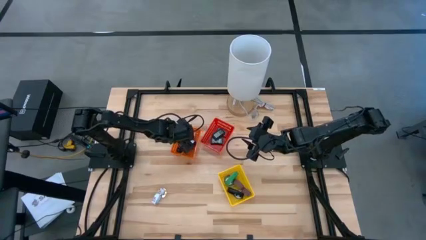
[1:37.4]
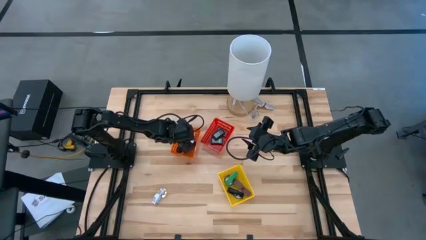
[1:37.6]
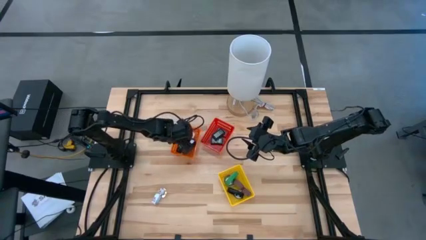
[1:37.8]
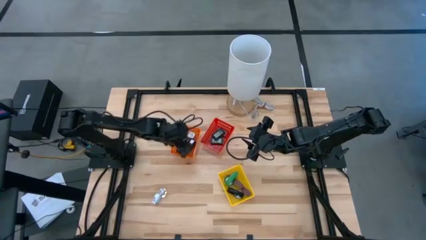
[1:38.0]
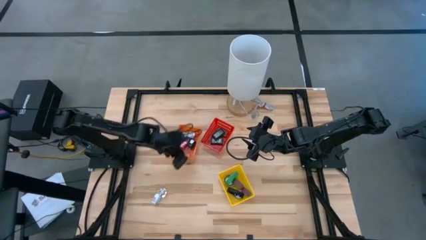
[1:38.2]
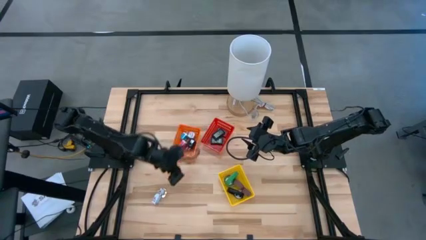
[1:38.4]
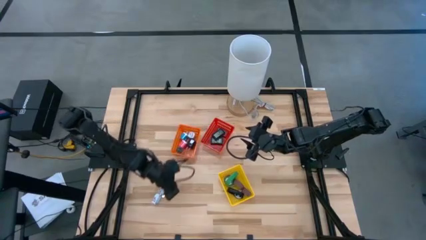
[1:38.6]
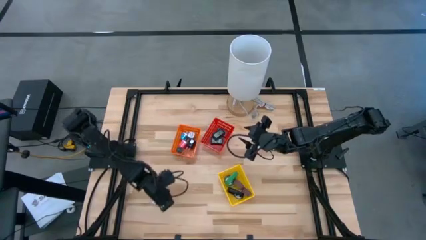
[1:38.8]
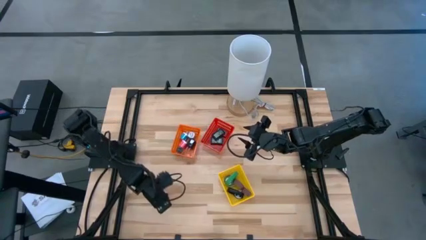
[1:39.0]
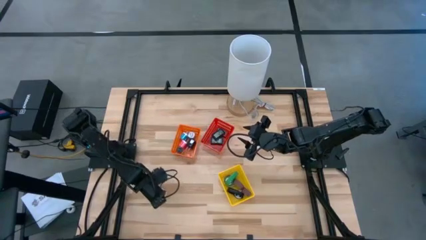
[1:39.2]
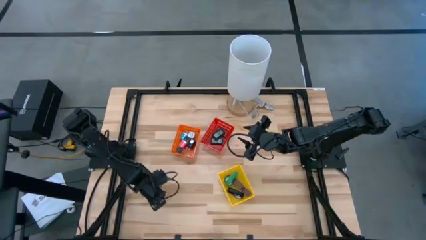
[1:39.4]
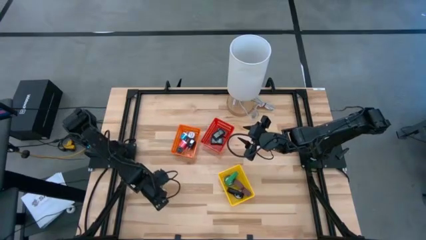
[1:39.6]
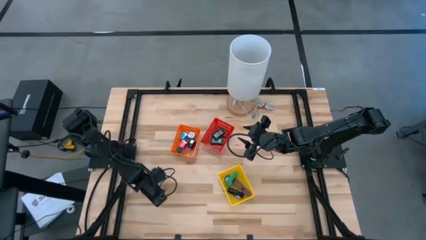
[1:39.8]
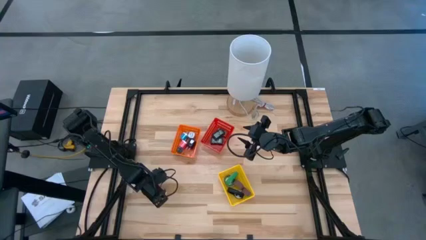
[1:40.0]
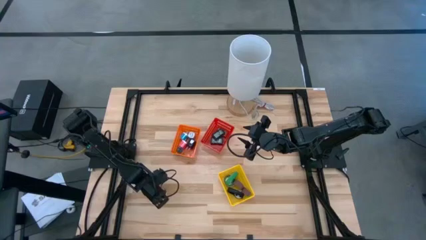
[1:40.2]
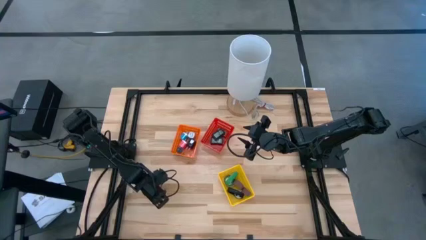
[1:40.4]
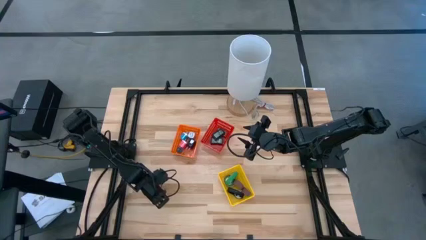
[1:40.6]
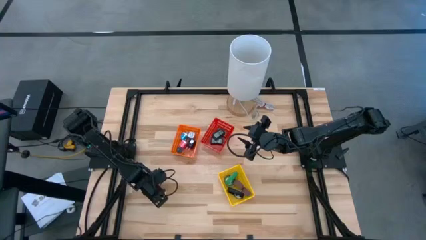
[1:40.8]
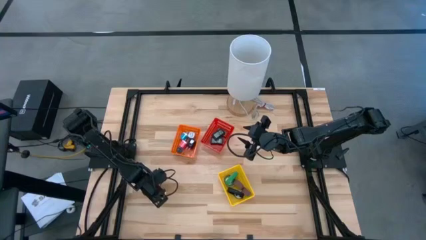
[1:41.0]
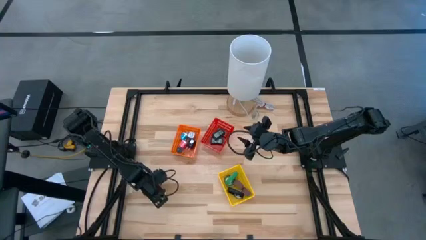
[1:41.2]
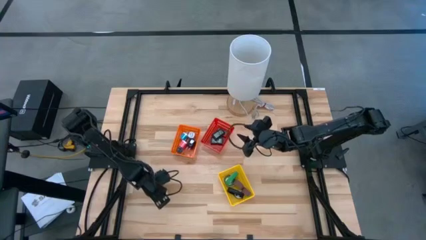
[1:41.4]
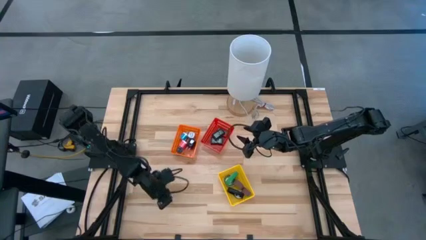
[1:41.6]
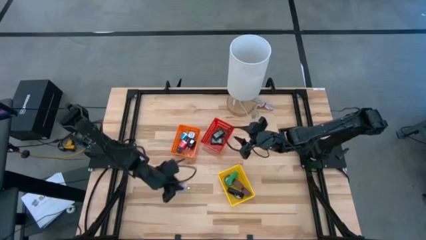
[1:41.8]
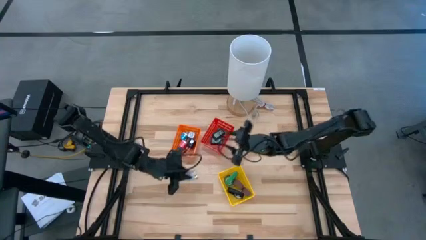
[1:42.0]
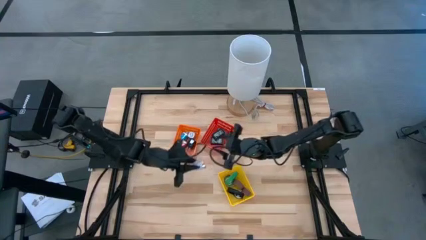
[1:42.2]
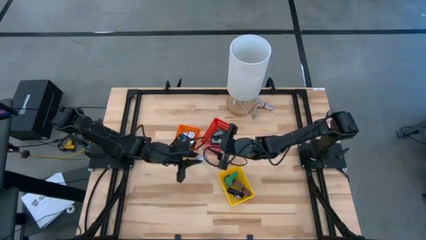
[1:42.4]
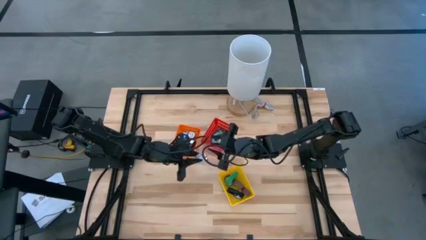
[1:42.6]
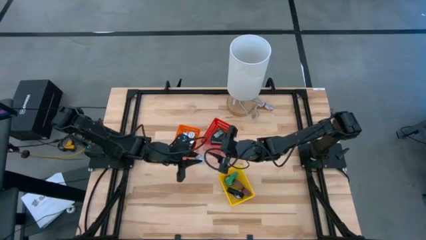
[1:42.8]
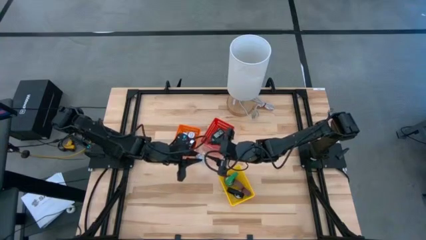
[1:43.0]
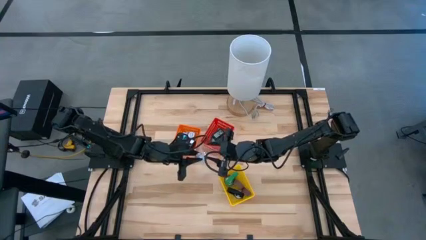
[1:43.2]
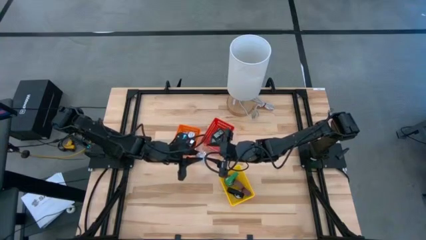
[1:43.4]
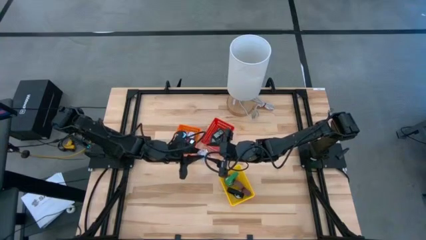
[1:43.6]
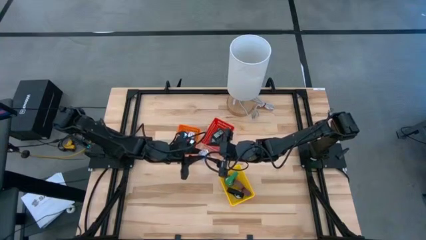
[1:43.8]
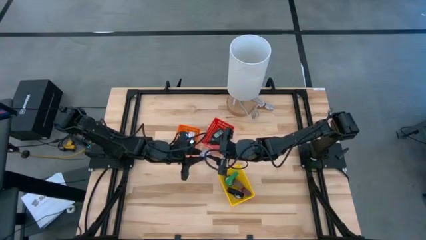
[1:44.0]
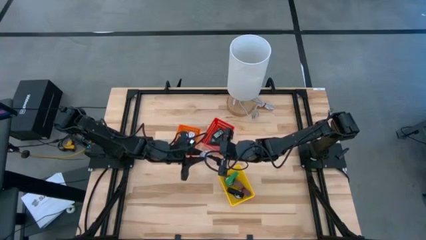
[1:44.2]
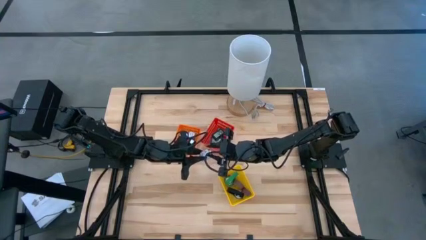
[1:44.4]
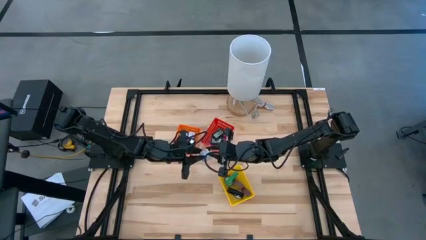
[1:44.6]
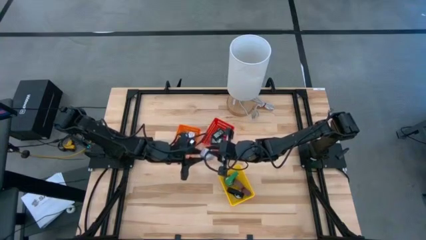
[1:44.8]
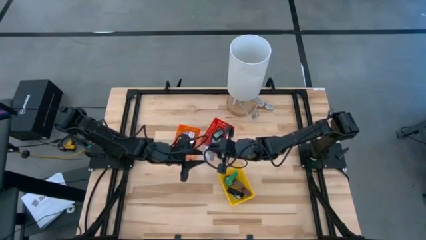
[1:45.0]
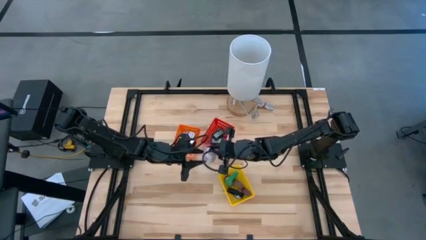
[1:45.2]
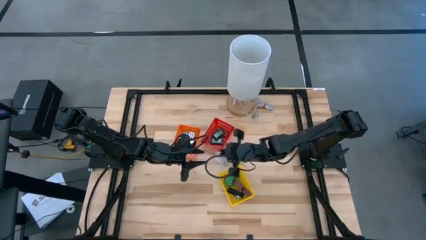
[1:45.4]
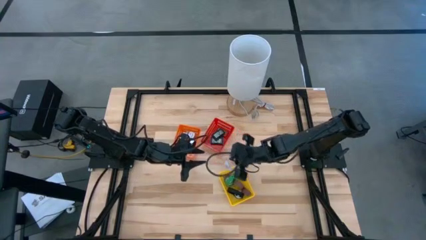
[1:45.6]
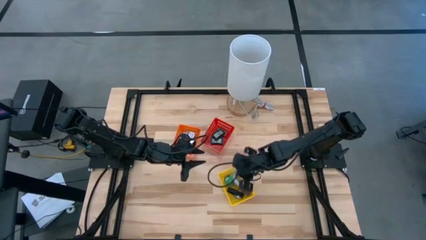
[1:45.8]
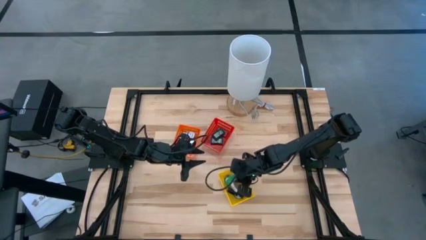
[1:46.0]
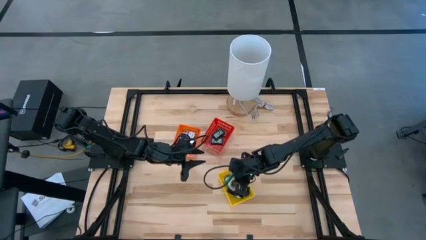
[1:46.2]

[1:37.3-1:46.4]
Task: Pick & Place Office items
Put the white wrist watch into the yellow bin

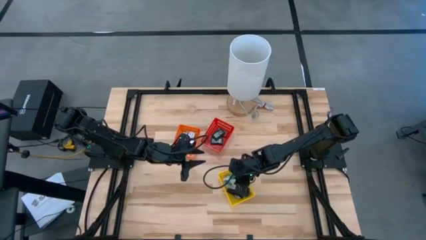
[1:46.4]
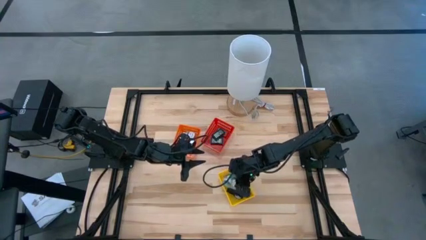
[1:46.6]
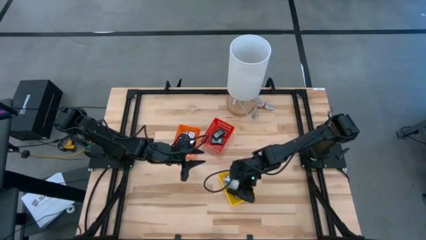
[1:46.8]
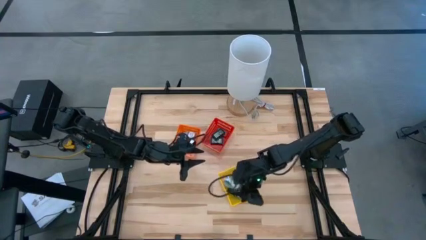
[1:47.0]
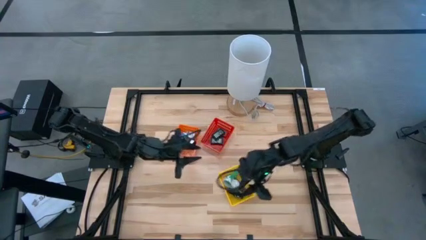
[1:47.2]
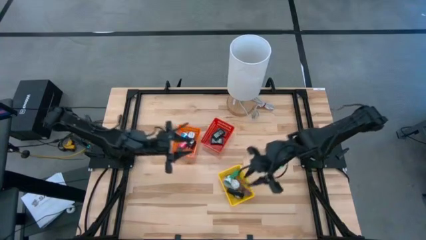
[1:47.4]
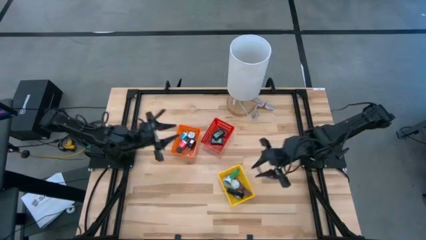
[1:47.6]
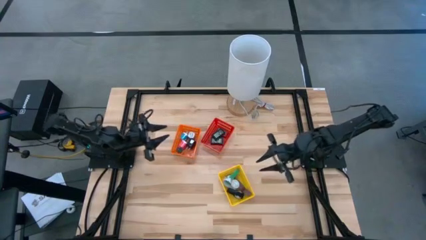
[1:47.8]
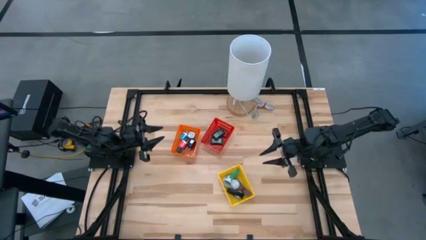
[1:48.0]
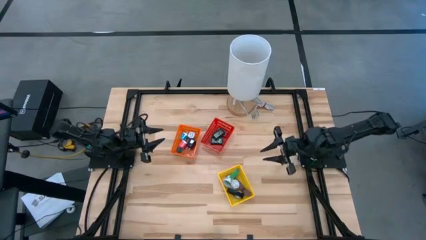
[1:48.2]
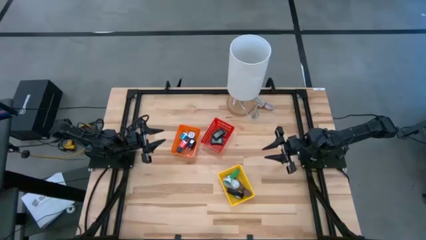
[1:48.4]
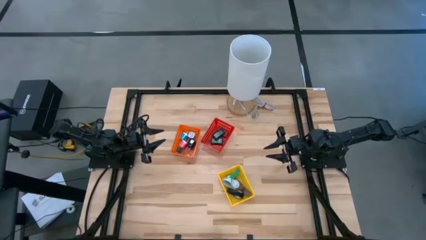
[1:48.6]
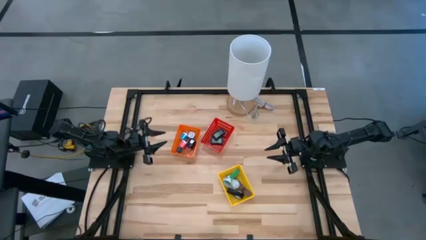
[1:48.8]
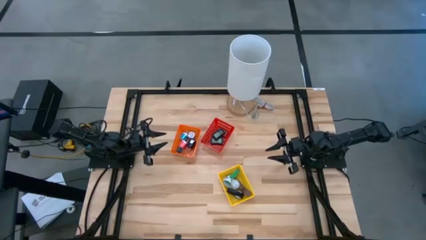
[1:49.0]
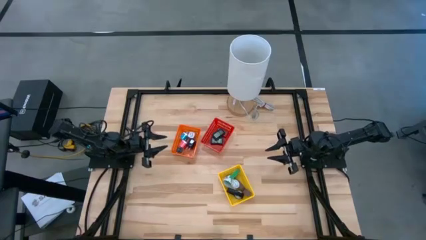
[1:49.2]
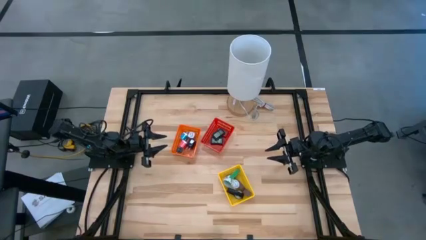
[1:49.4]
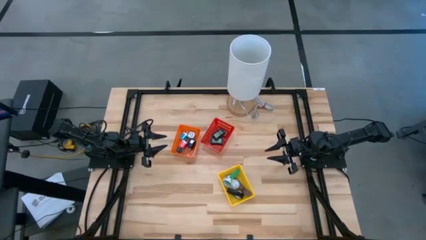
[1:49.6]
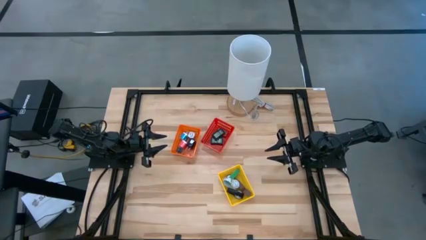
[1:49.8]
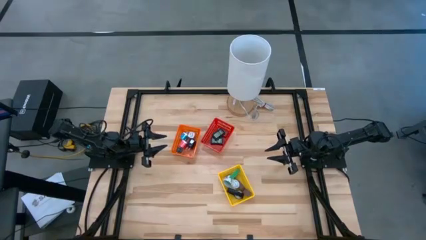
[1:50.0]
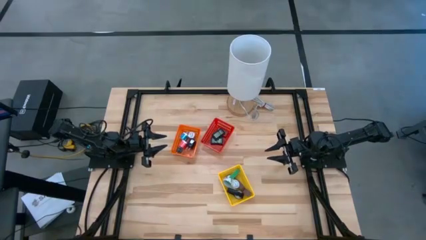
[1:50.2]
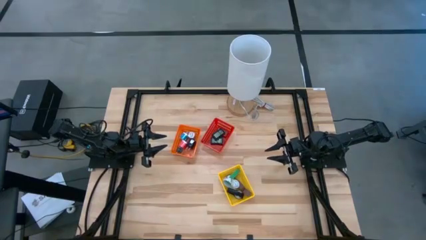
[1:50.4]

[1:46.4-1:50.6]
Return to Home Position
